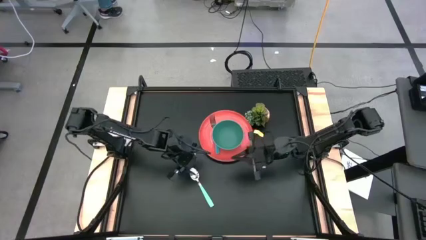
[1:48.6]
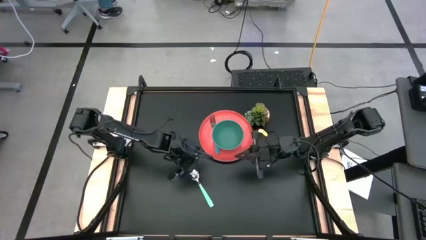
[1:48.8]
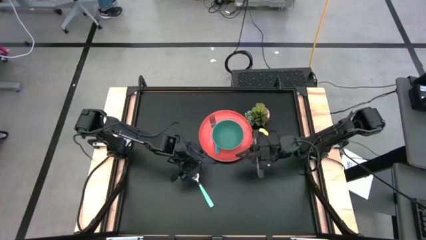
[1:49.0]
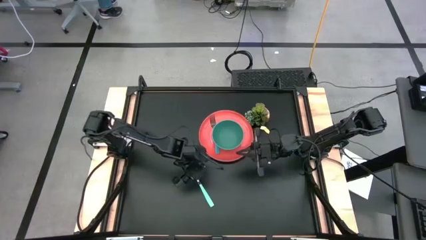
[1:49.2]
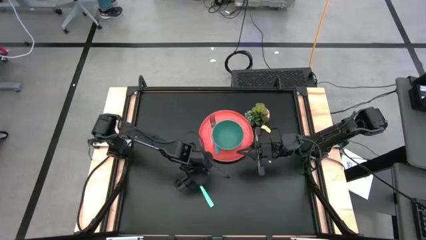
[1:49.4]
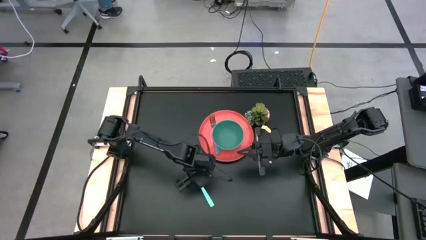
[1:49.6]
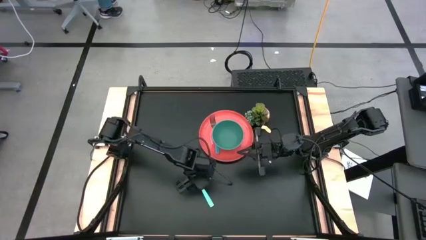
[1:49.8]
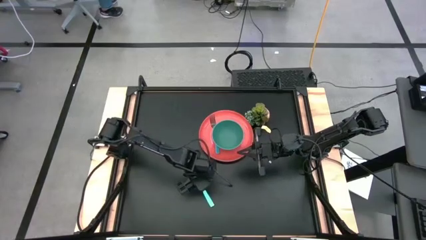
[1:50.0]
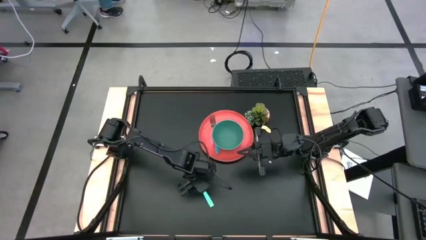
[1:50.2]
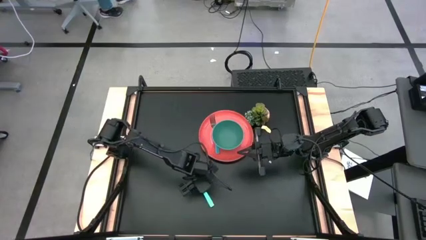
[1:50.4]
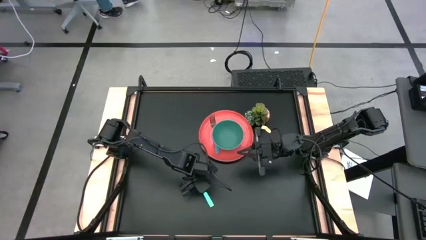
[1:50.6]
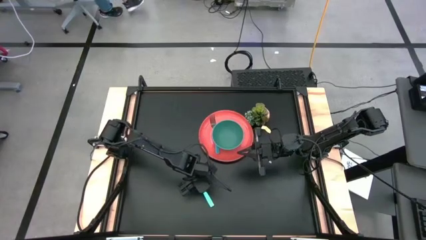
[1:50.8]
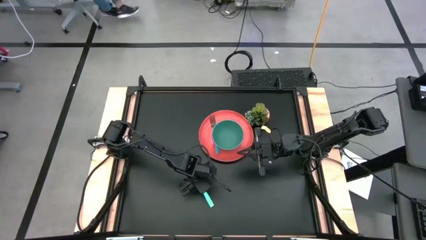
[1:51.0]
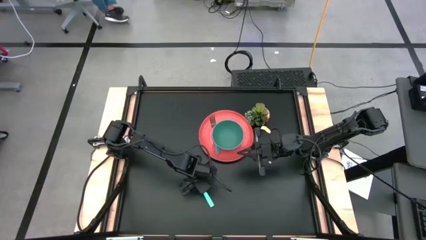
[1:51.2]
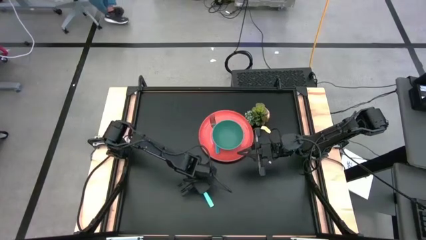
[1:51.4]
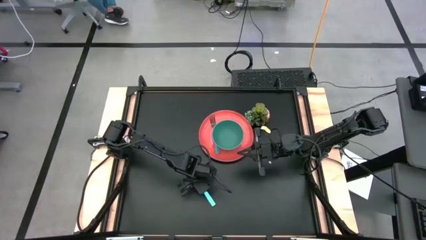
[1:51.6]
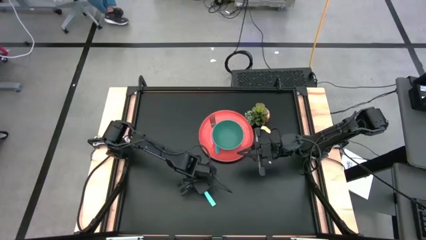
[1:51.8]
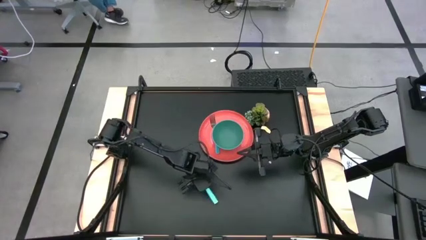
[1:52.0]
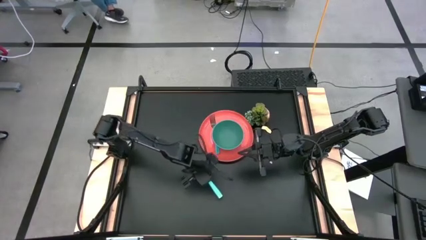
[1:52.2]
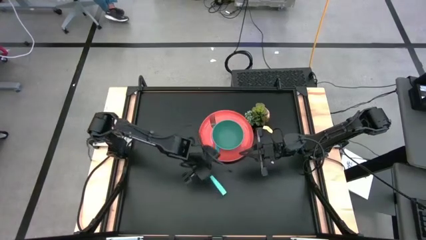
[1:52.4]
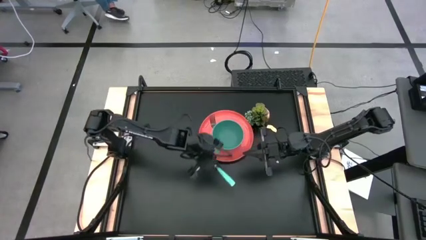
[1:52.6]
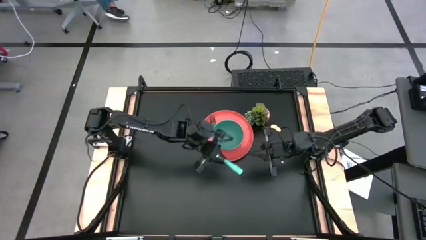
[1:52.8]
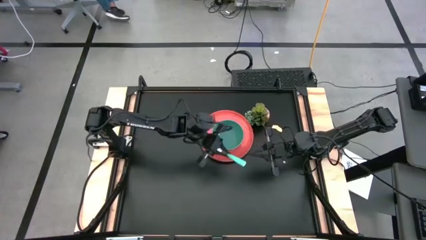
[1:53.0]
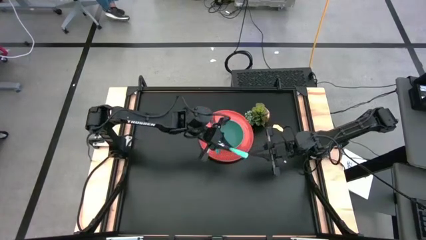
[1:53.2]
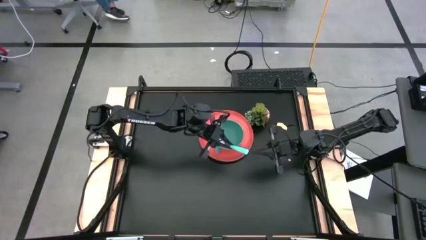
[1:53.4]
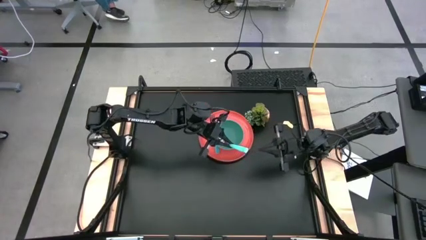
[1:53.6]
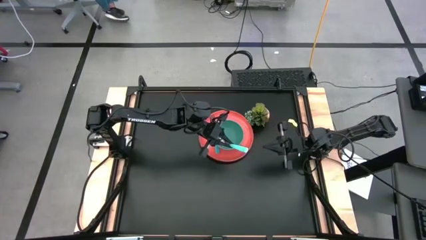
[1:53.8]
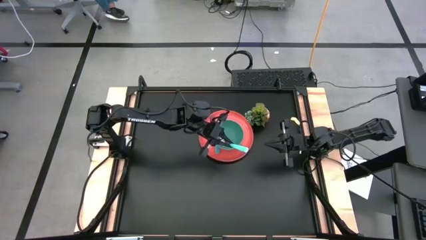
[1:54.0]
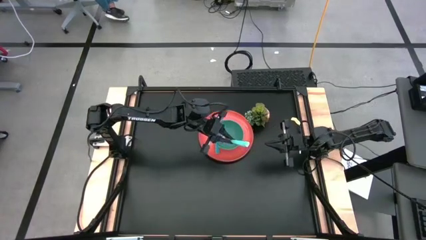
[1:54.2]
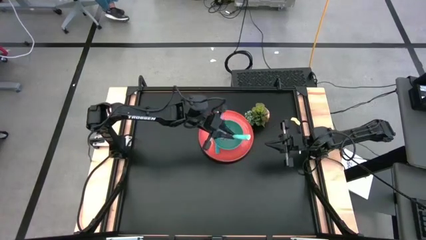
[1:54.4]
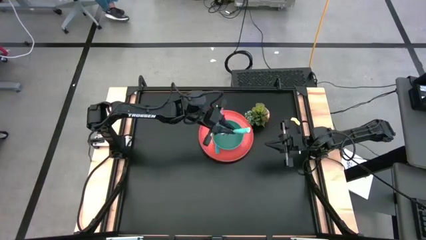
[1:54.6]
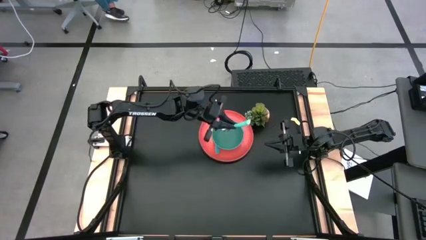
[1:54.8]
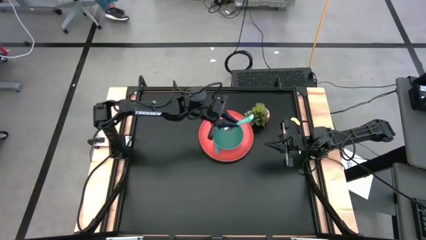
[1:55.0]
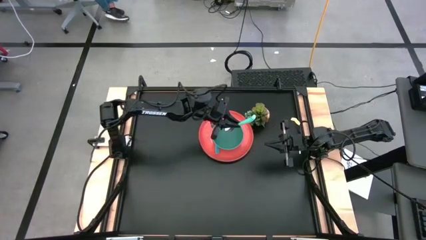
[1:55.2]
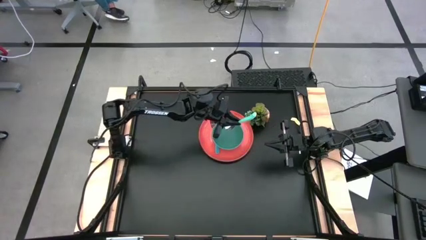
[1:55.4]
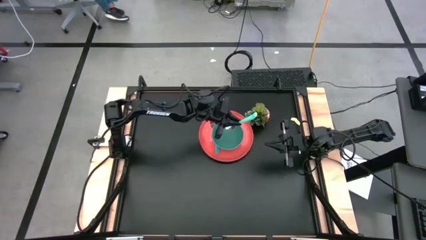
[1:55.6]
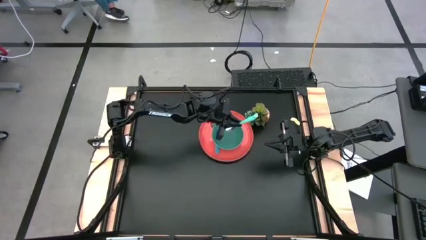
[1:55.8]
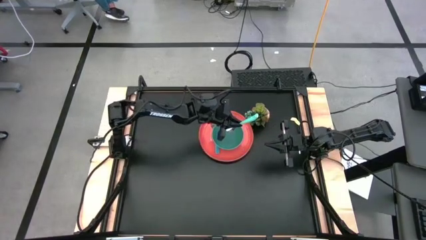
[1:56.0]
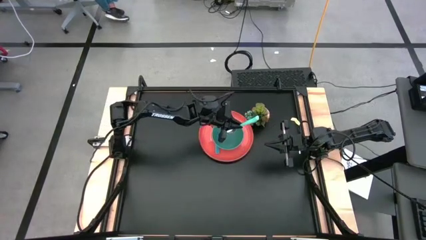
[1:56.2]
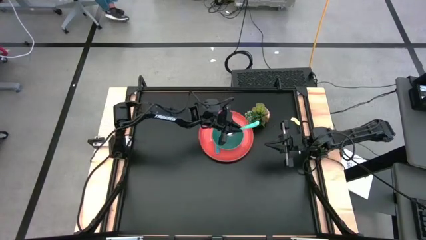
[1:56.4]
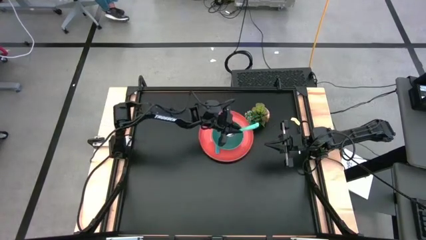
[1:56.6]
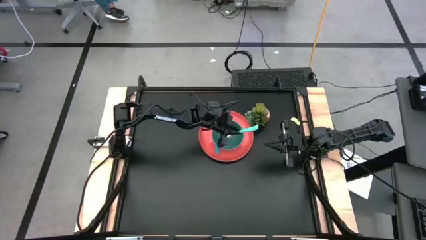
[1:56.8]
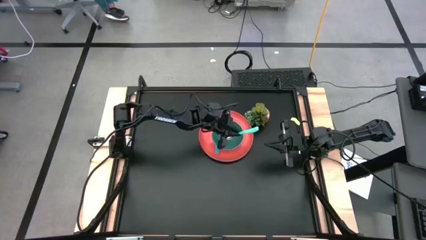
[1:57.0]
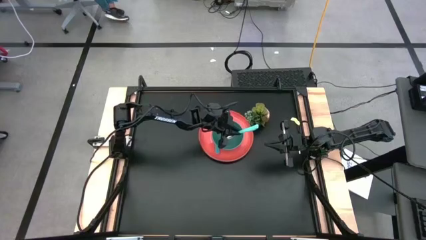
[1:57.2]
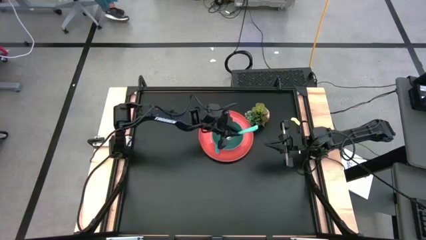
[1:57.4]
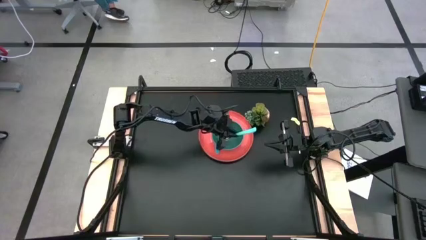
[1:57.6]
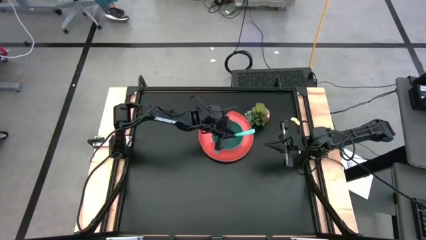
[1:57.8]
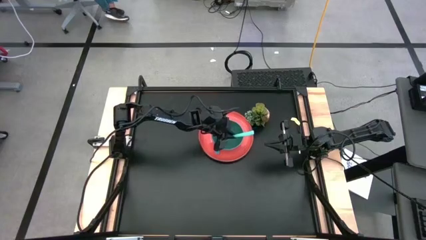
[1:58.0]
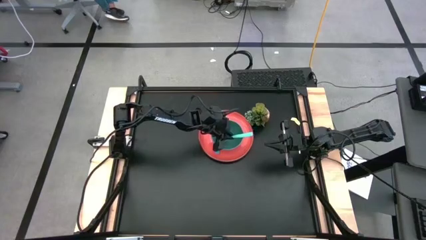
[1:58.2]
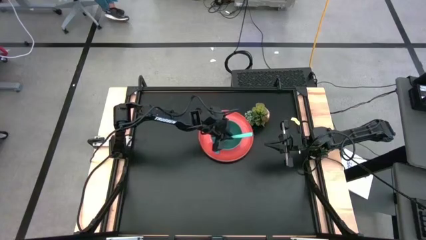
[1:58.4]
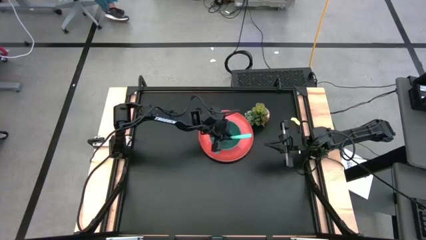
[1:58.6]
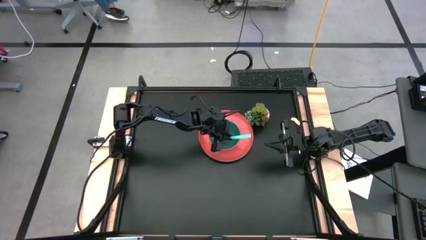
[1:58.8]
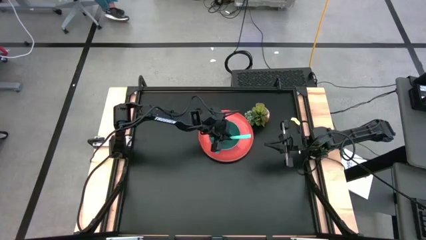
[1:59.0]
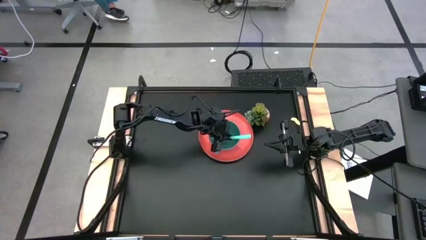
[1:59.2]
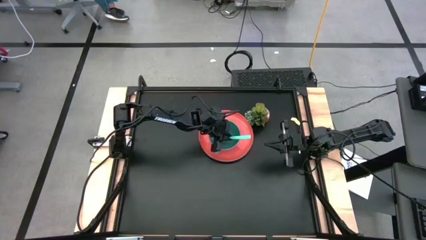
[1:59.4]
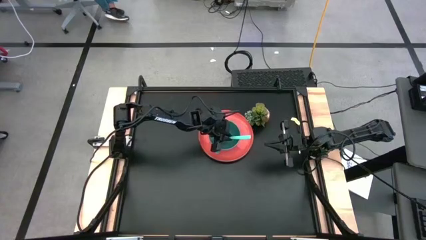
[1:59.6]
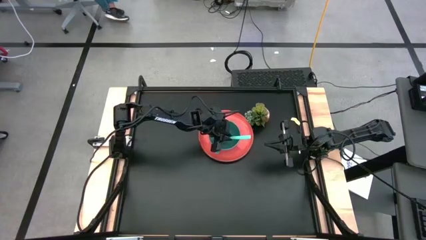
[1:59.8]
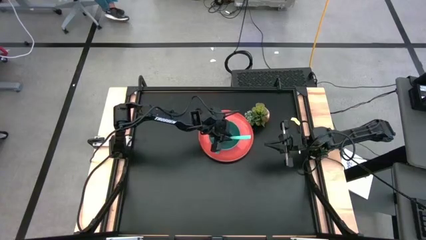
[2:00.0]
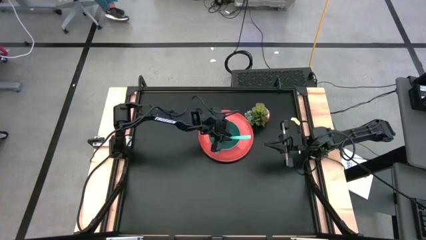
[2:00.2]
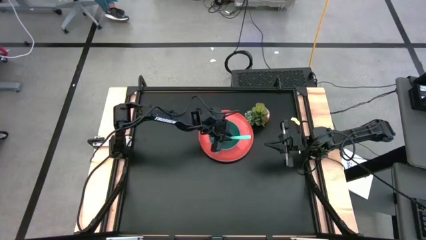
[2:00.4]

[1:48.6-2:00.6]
Task: Set table place
Put the blue spoon into the green bowl

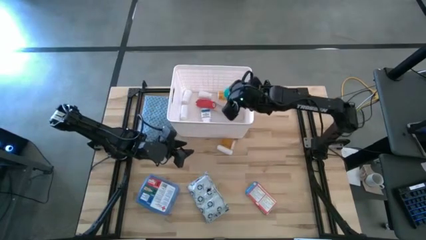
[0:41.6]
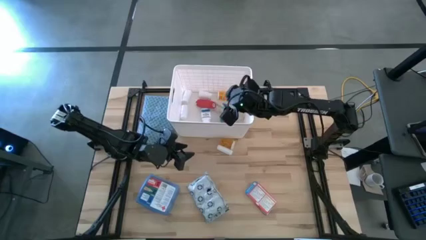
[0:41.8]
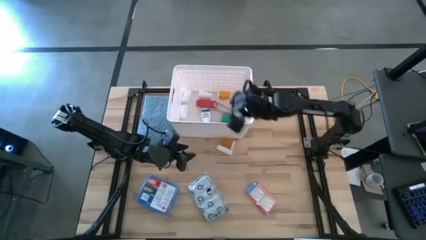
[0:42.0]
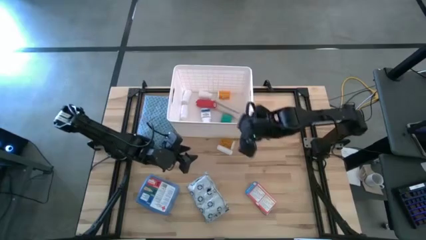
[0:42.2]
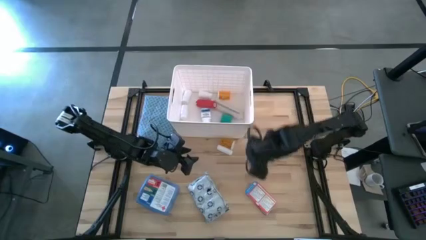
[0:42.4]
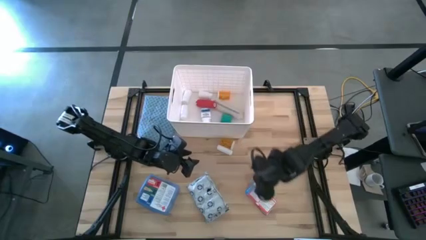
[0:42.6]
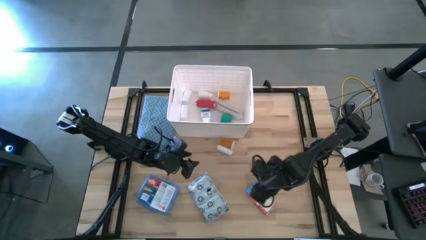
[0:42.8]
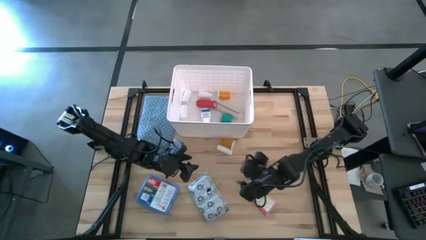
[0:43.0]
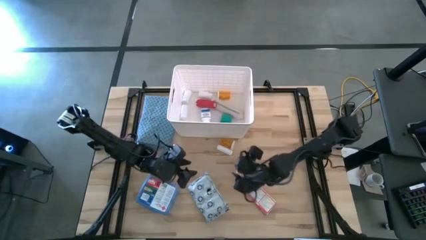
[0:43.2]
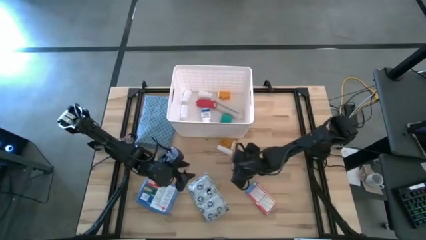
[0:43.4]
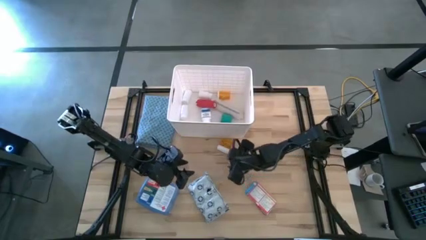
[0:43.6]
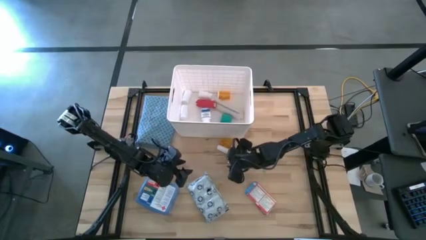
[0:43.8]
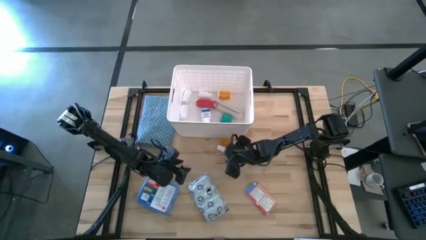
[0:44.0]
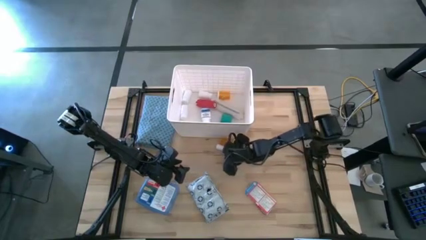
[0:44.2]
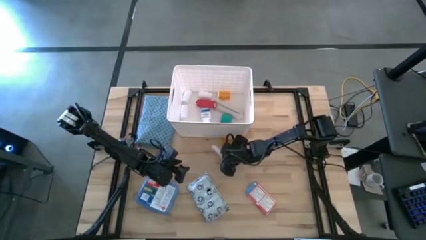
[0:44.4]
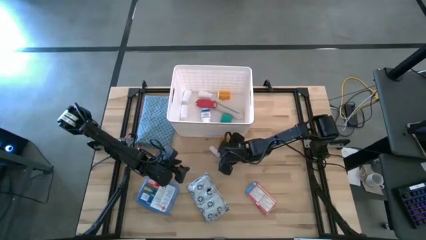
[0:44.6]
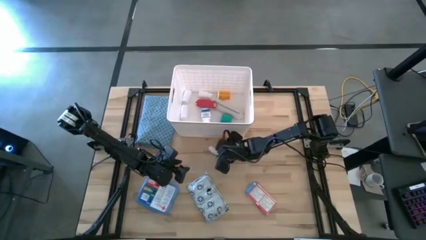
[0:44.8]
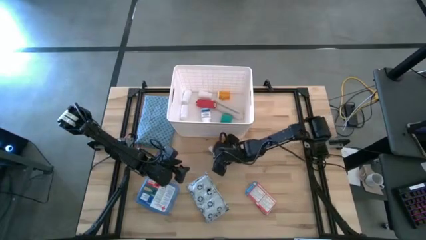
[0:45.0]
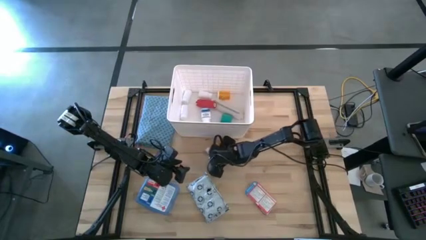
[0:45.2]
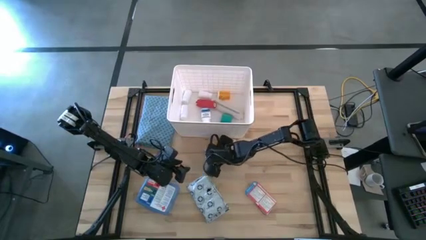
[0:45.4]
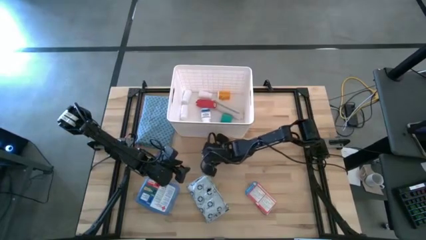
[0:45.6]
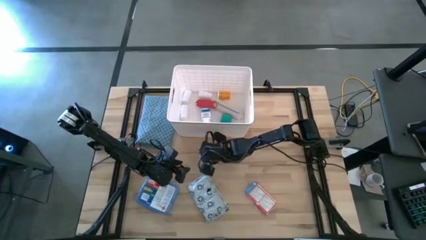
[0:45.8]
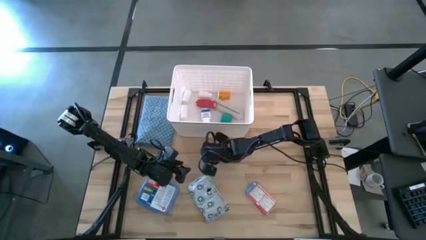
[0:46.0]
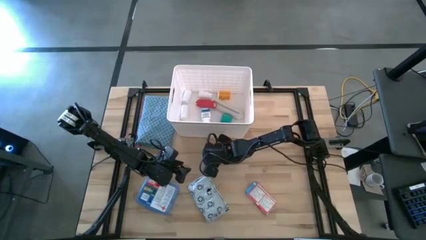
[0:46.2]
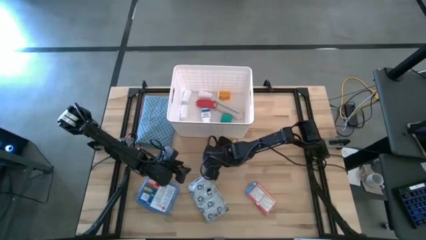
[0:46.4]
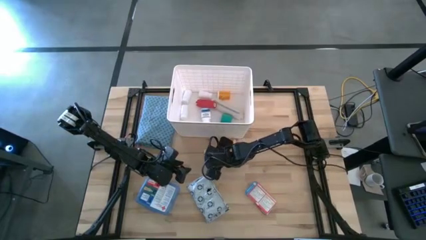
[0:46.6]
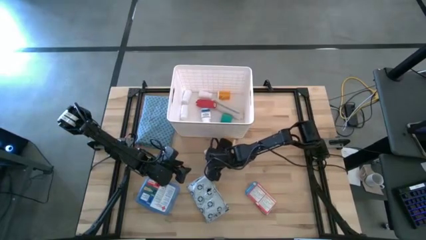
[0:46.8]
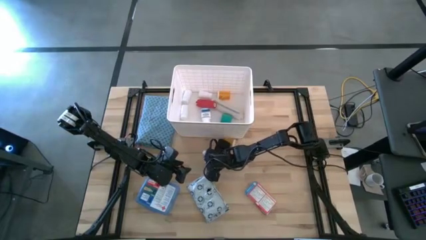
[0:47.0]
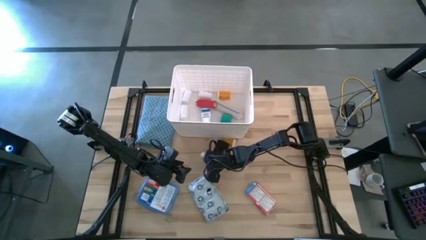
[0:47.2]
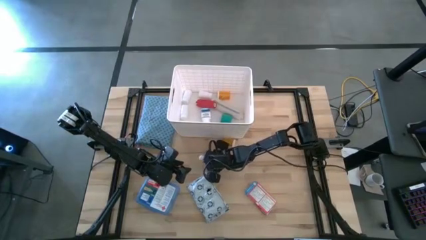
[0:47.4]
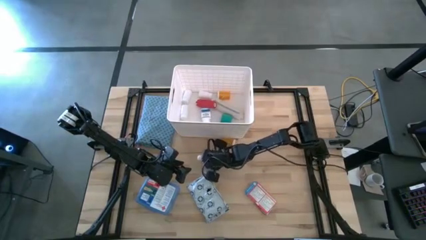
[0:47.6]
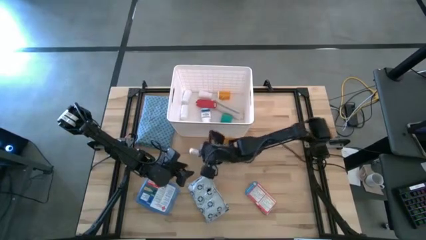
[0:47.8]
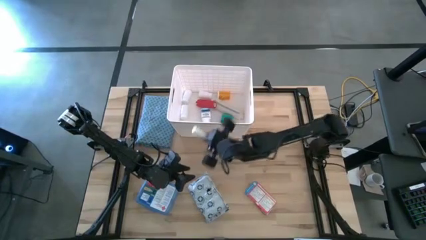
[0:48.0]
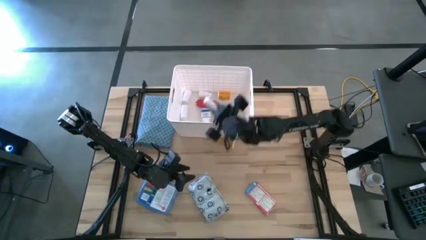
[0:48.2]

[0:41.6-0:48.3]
Task: Pick & place medical supplies in basket/bin
Put the white rolled gauze in the white bin
